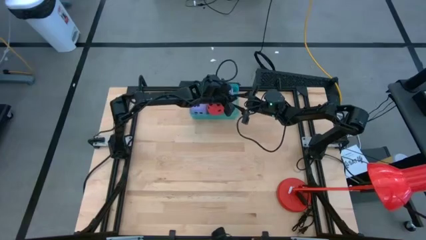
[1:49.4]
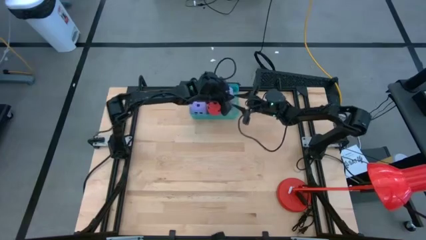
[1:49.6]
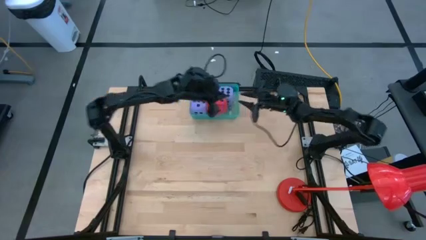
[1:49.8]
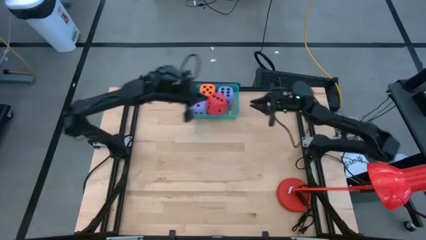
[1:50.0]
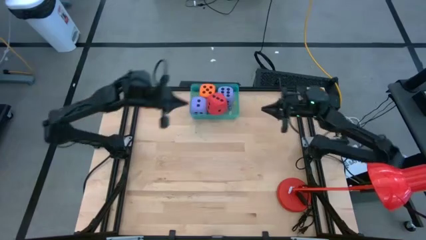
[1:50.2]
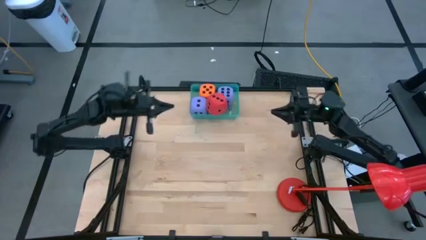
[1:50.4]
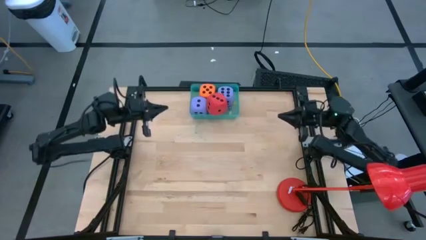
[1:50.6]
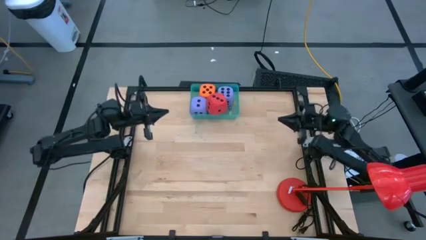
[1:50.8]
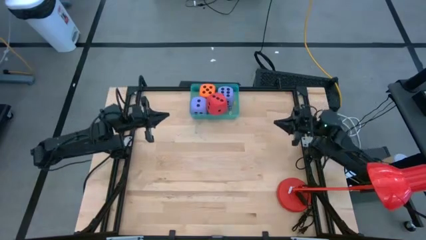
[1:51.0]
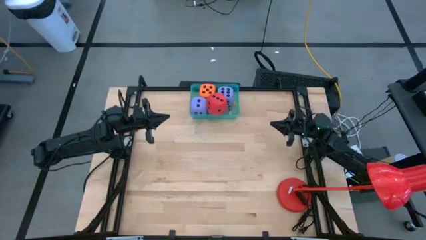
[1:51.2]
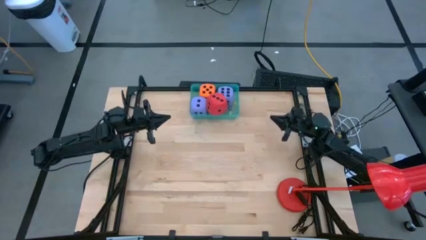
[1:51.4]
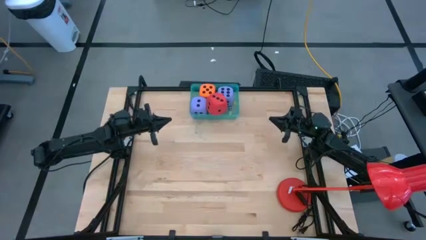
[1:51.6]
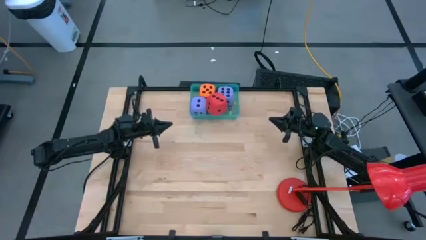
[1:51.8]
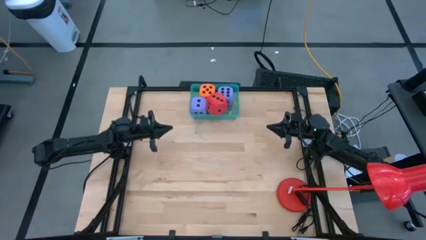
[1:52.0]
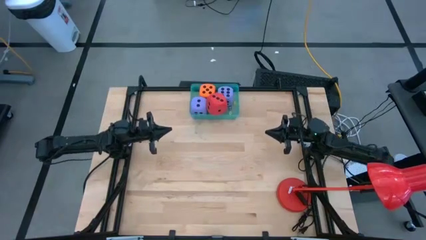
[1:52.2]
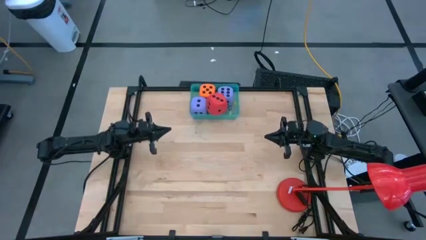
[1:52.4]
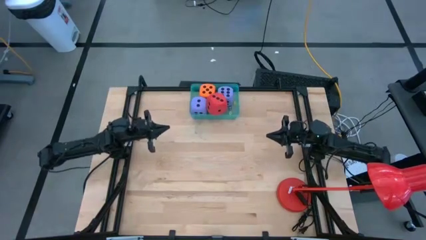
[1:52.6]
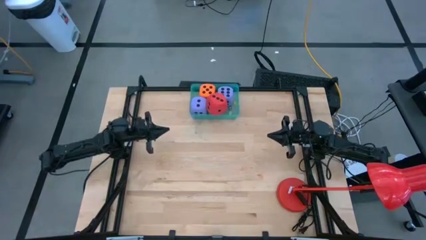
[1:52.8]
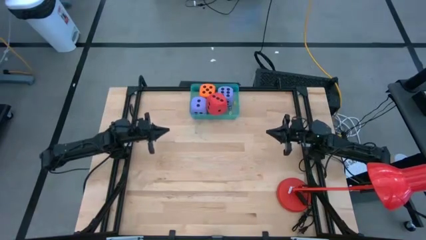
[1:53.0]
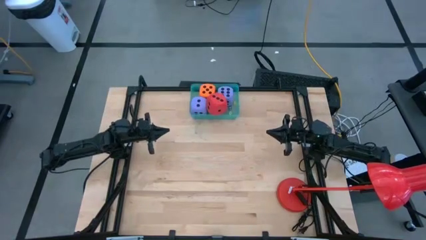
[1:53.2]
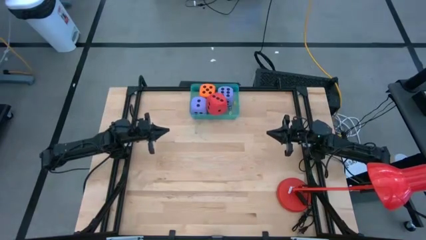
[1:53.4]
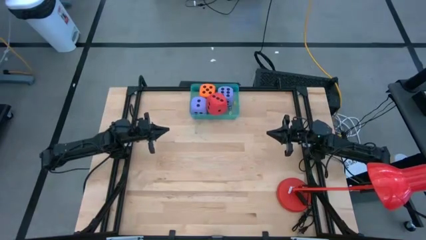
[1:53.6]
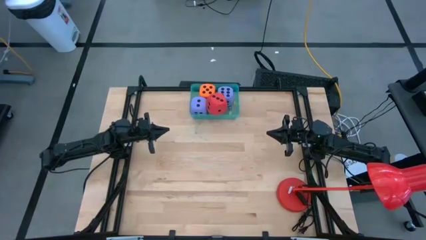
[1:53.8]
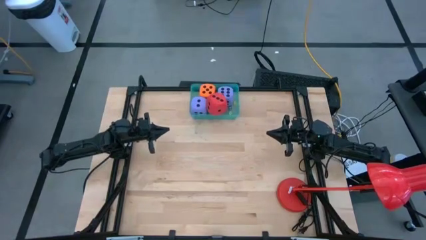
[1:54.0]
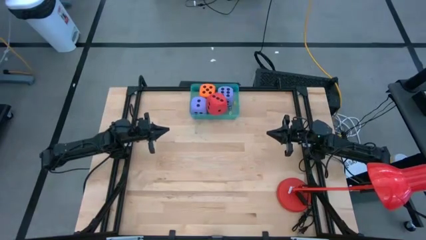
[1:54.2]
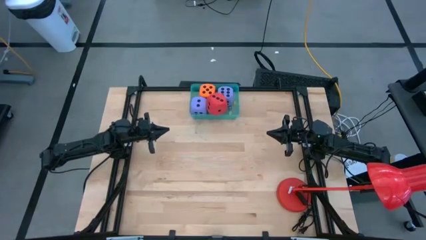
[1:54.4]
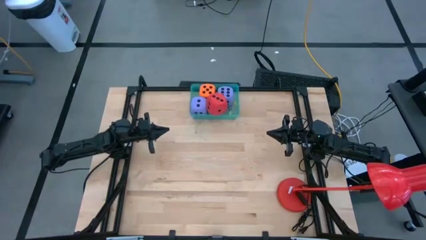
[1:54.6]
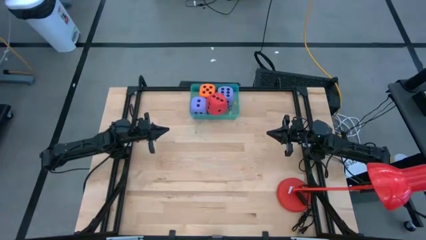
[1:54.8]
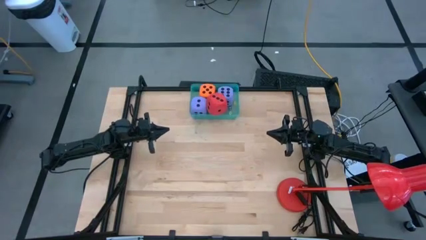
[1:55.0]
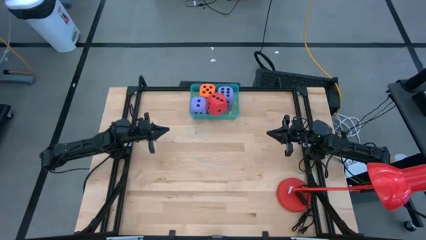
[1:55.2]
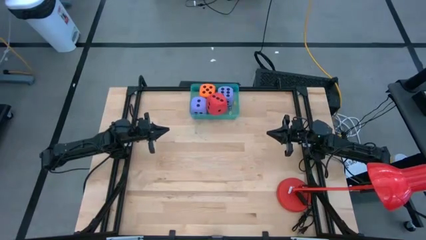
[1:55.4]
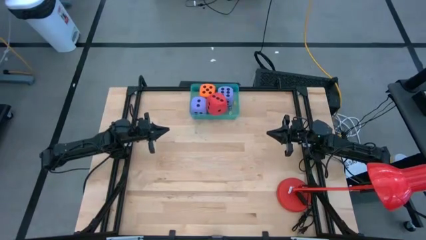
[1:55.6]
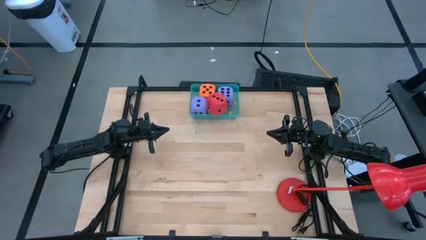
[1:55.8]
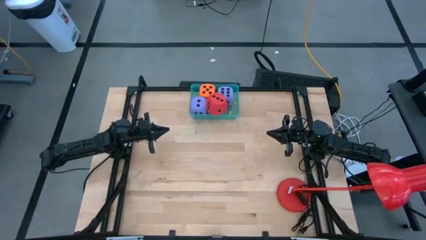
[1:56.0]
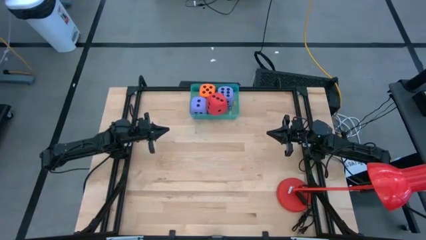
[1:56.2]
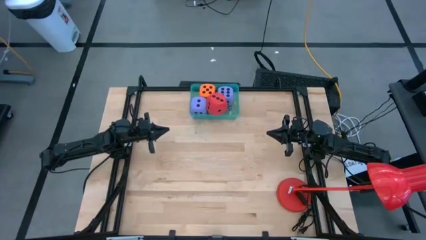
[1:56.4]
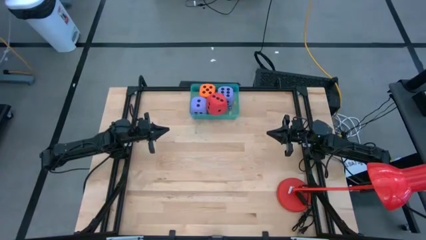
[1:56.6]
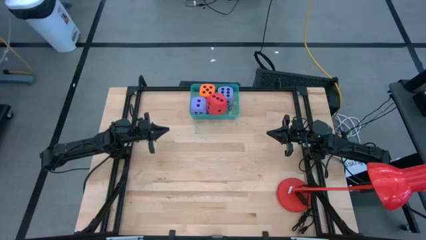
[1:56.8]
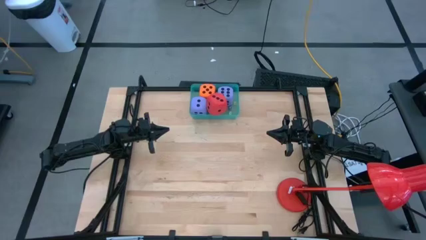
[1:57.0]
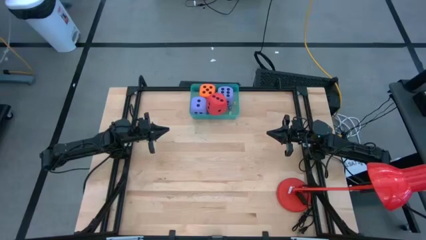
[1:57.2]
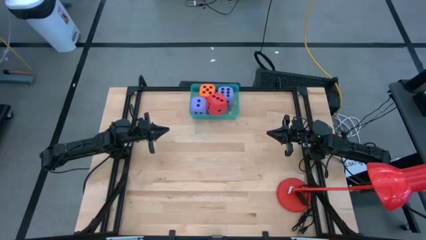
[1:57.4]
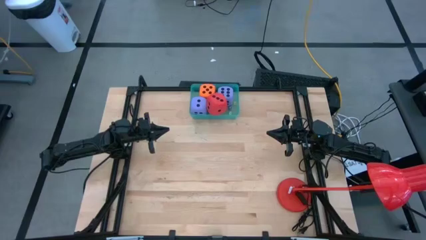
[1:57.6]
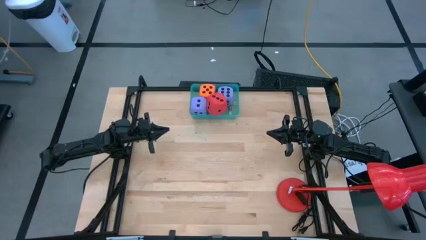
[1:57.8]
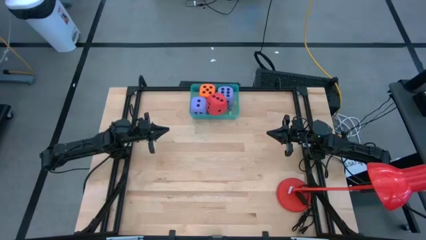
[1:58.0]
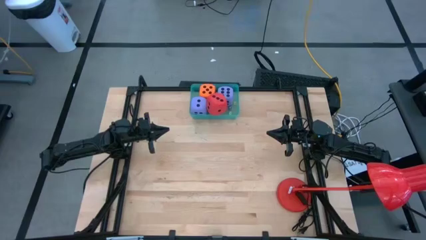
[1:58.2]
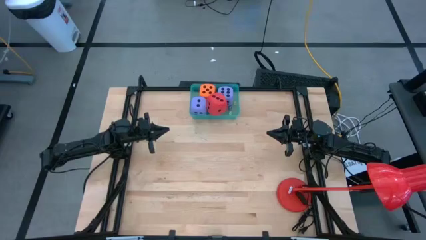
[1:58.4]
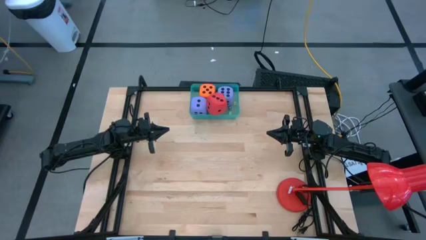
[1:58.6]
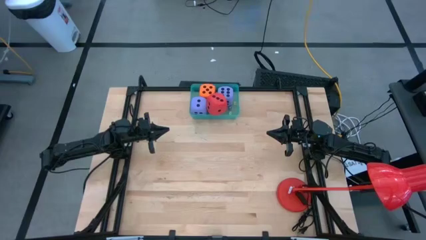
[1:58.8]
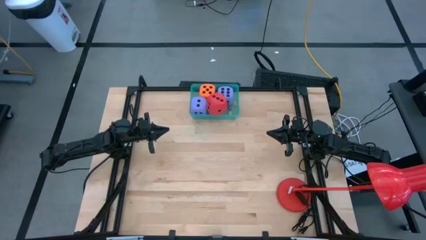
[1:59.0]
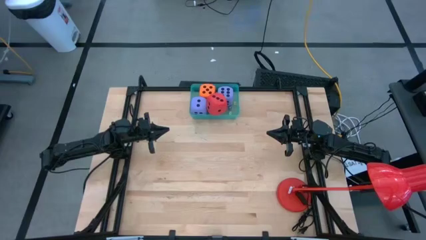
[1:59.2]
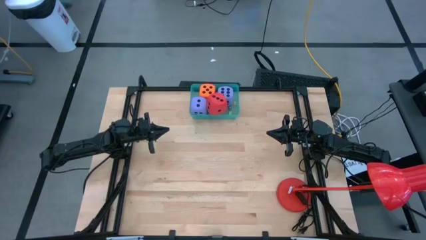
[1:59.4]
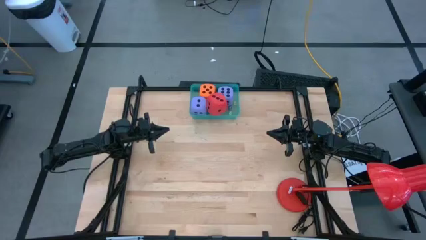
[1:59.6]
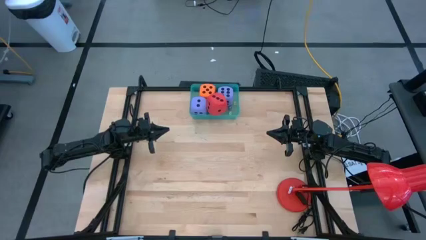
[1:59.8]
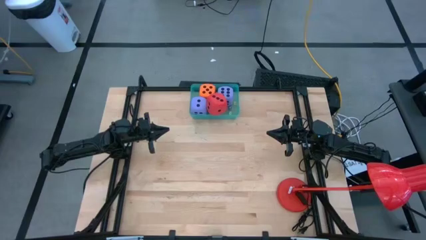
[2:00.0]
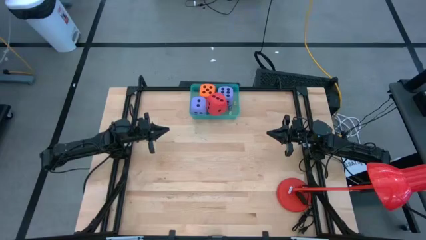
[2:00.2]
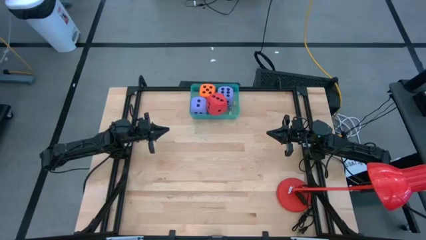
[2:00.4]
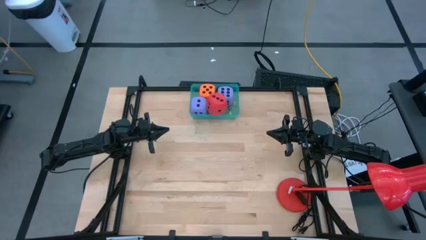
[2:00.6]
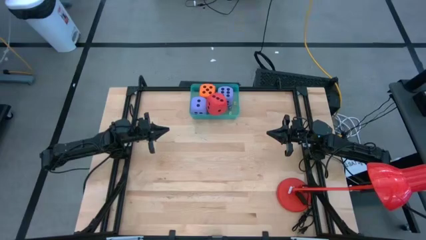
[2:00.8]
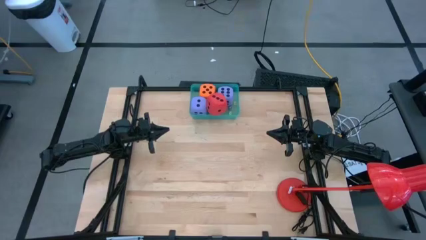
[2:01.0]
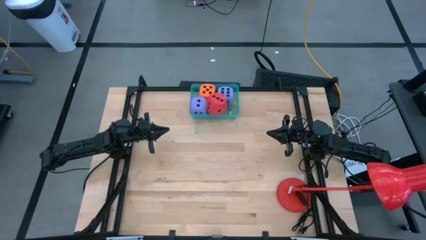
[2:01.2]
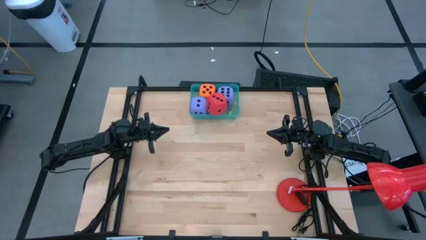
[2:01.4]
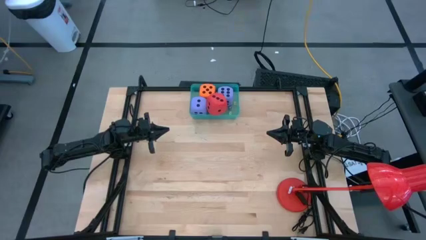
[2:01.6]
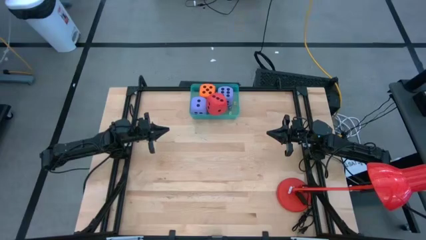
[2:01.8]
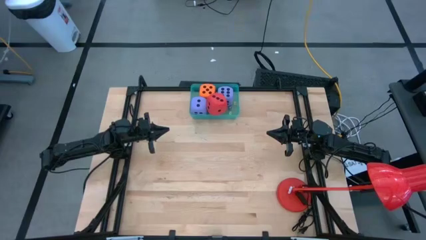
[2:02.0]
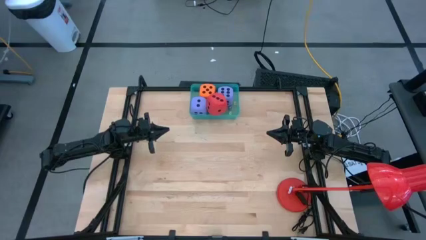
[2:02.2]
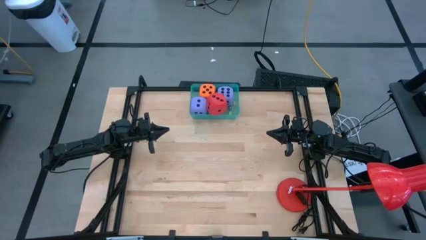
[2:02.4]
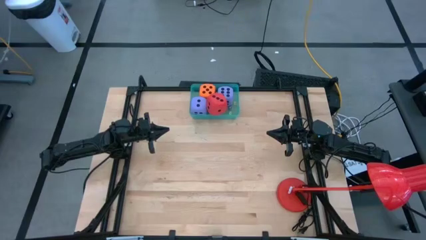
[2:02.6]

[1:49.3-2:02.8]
Task: Pick & Place Dice
Return to Home Position

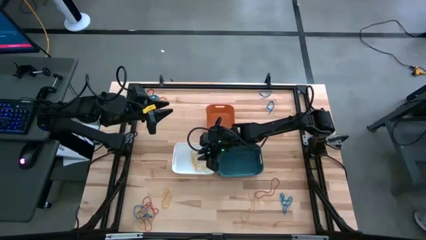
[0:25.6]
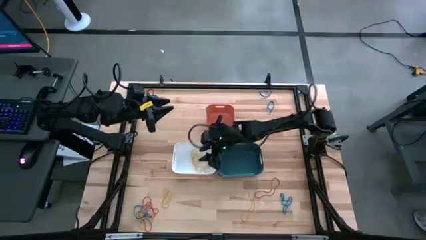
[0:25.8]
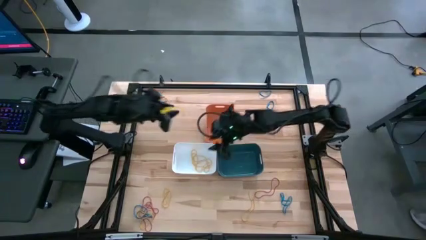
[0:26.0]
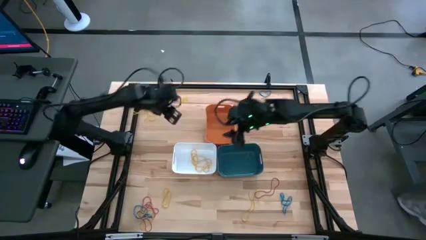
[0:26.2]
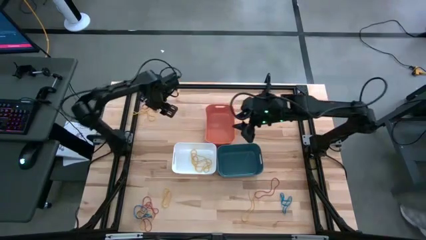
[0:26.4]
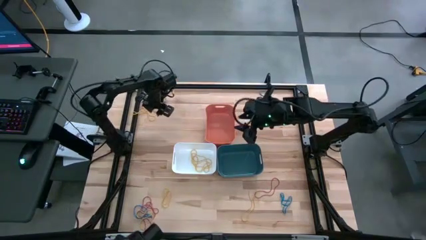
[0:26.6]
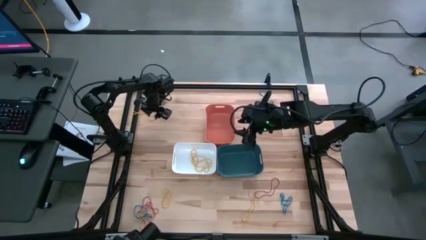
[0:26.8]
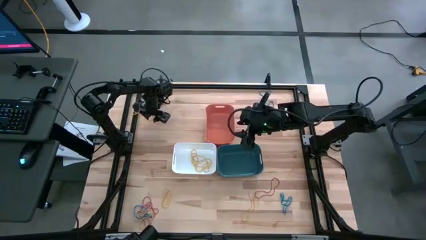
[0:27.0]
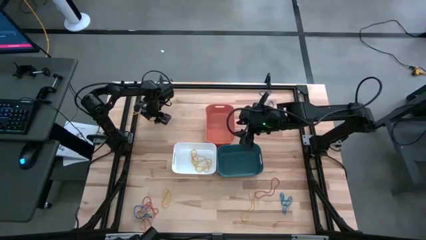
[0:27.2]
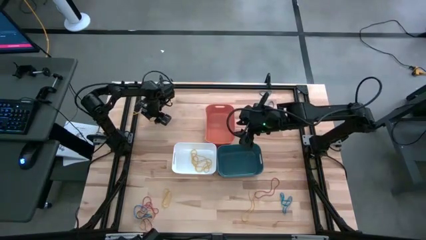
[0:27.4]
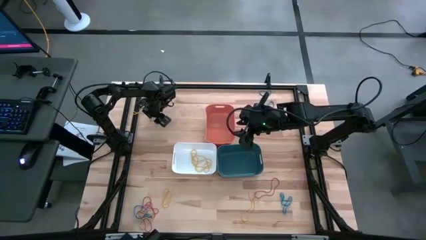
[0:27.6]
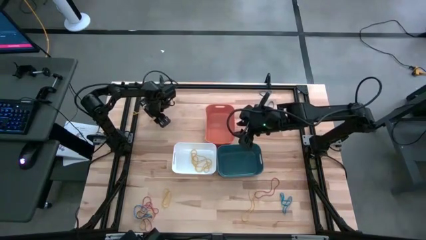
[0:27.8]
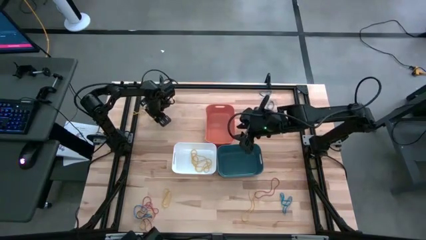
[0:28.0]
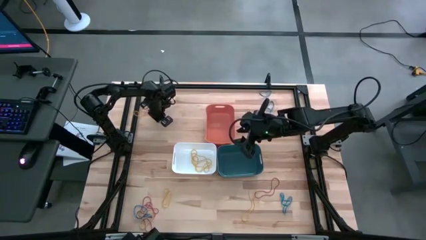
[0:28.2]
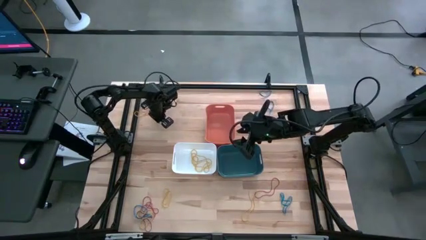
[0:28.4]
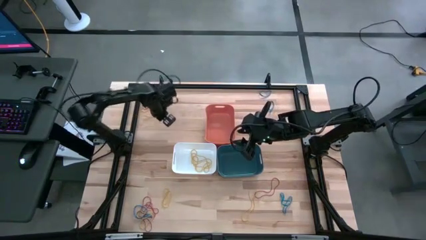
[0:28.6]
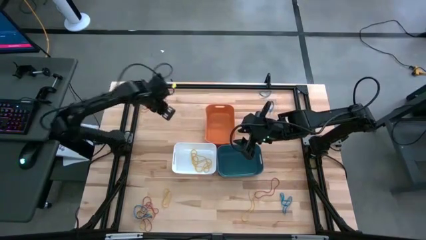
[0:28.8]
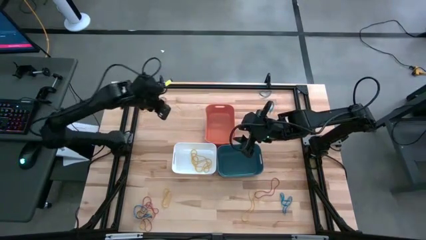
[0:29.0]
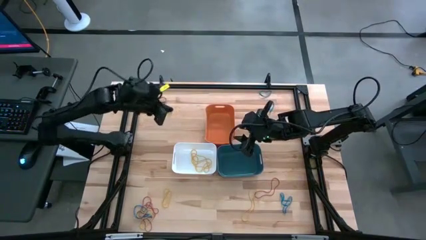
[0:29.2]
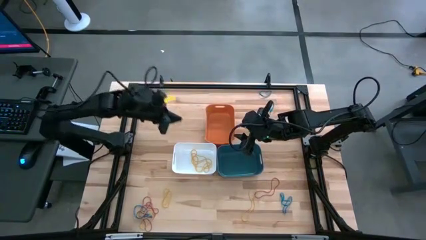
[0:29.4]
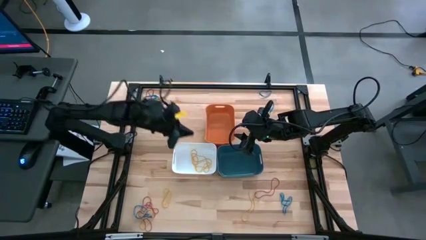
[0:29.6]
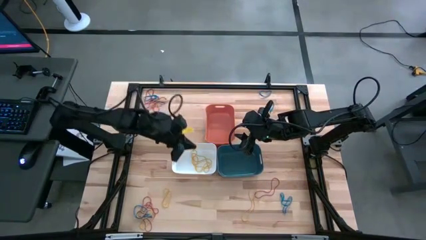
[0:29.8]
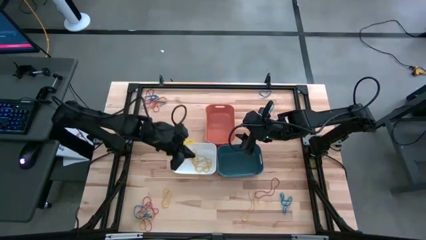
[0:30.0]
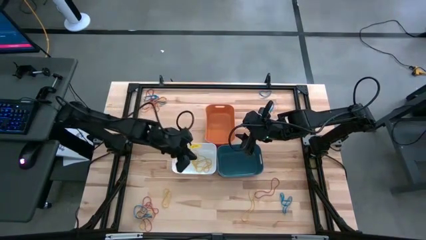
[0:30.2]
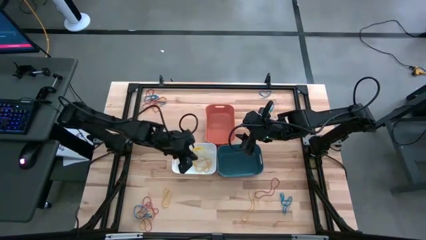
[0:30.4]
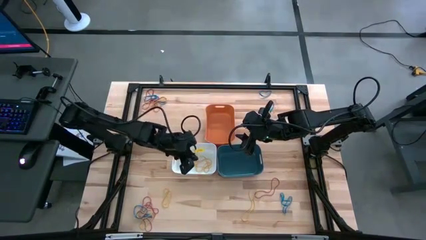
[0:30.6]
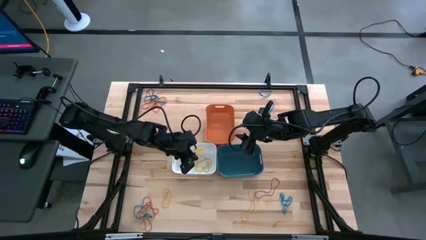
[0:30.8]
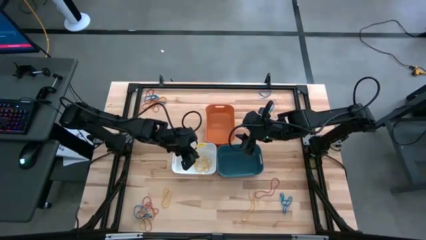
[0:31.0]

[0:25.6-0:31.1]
Task: Sort rubber bands into baskets
Put the yellow rubber band into the white bin
